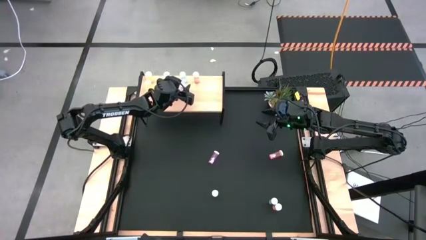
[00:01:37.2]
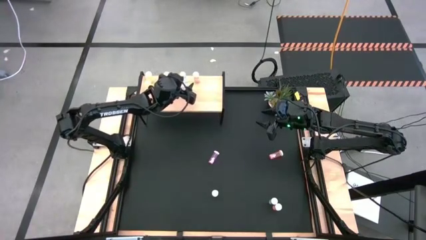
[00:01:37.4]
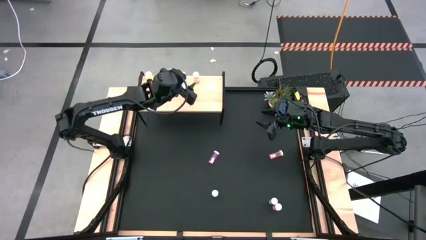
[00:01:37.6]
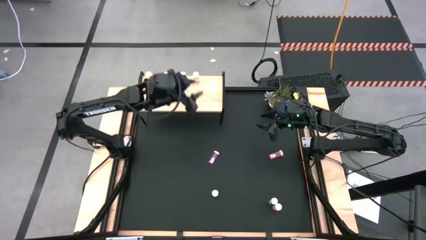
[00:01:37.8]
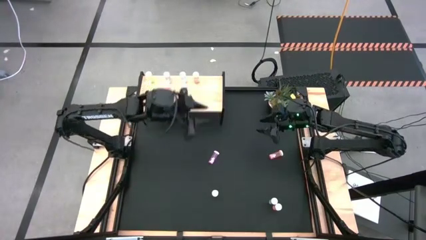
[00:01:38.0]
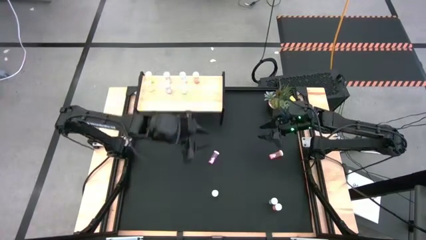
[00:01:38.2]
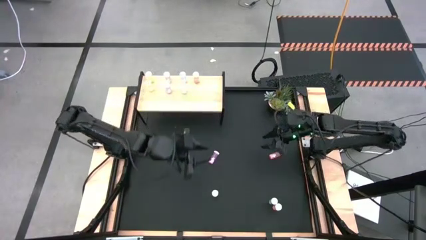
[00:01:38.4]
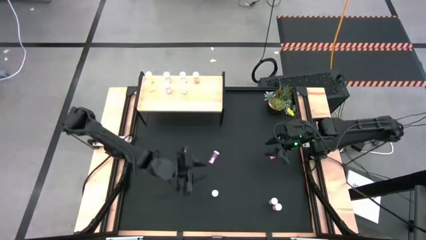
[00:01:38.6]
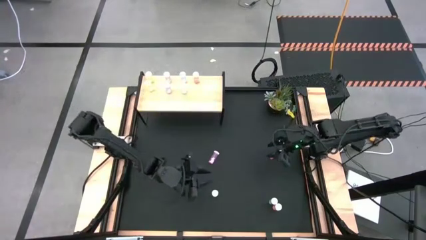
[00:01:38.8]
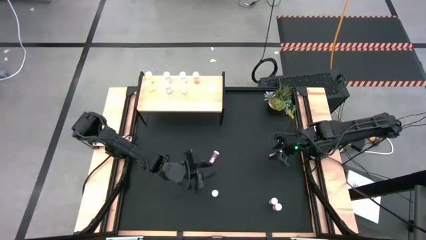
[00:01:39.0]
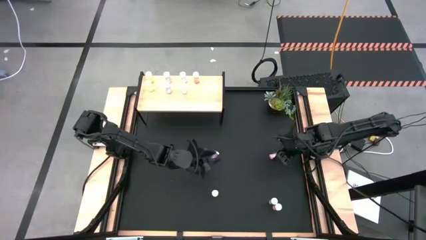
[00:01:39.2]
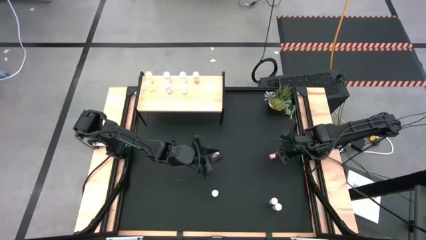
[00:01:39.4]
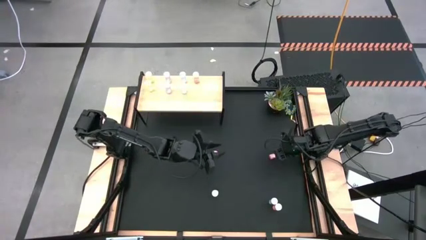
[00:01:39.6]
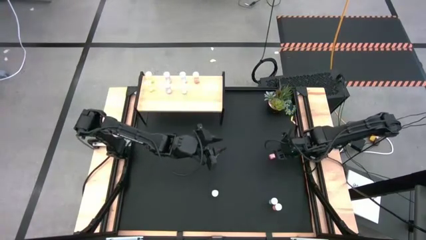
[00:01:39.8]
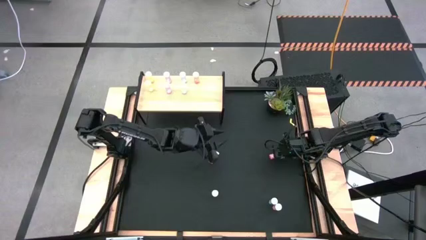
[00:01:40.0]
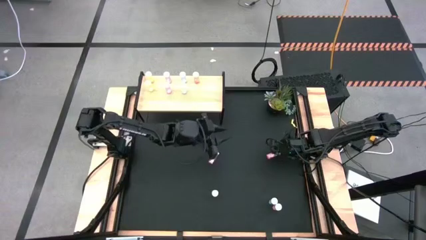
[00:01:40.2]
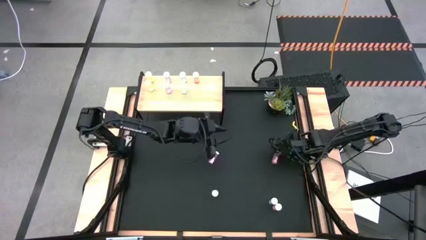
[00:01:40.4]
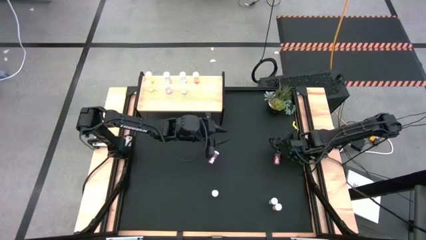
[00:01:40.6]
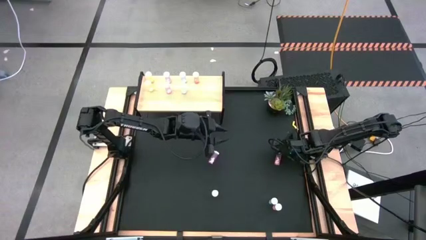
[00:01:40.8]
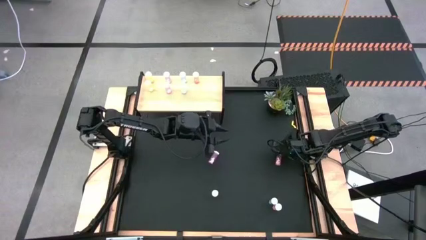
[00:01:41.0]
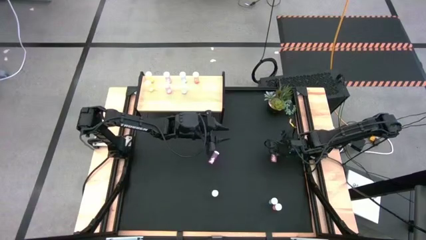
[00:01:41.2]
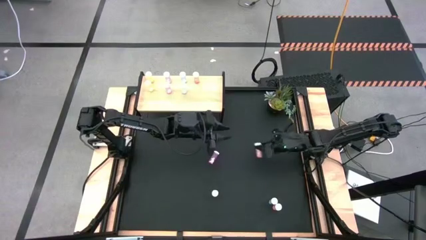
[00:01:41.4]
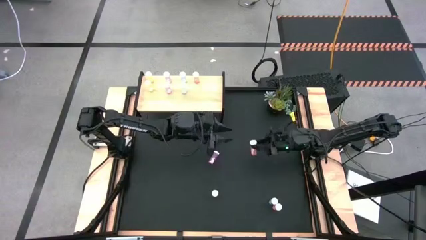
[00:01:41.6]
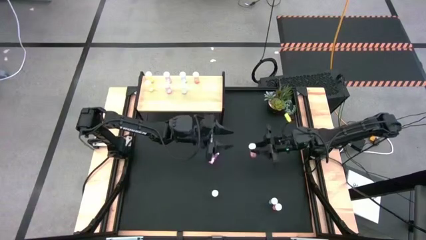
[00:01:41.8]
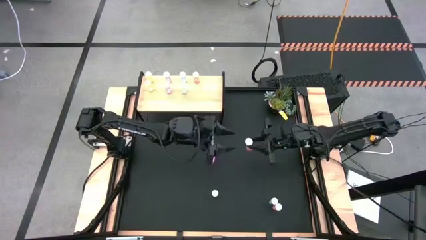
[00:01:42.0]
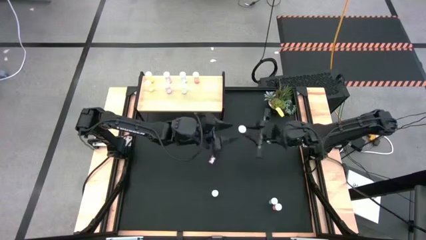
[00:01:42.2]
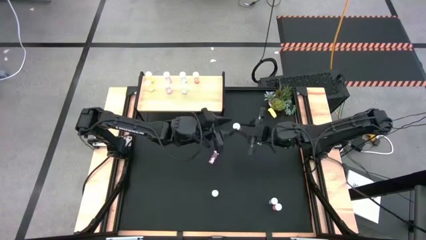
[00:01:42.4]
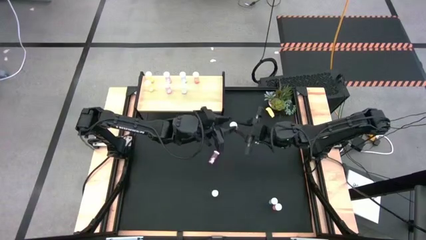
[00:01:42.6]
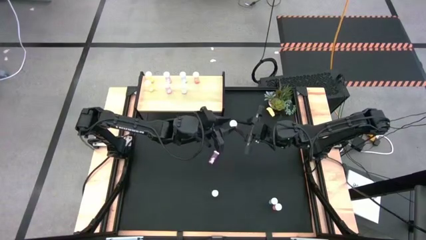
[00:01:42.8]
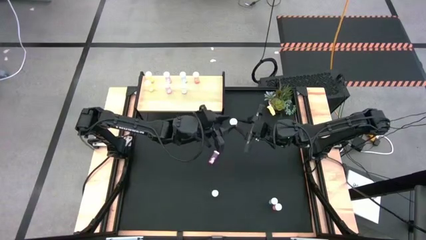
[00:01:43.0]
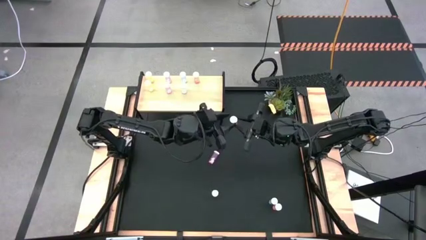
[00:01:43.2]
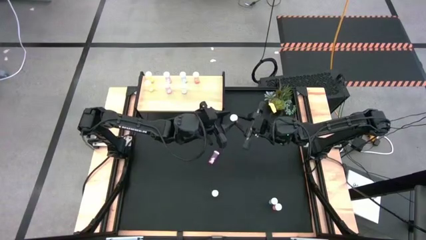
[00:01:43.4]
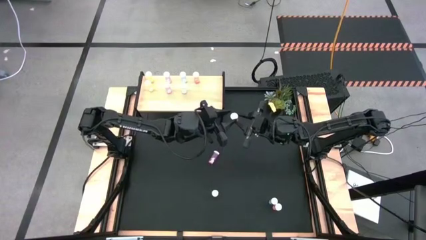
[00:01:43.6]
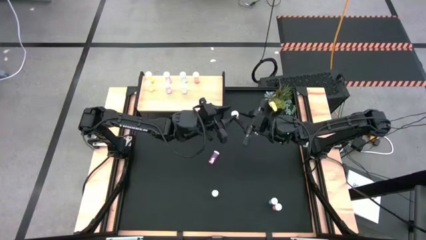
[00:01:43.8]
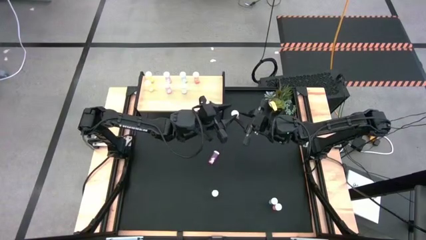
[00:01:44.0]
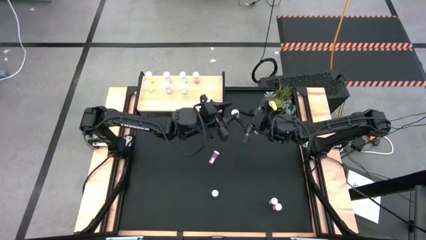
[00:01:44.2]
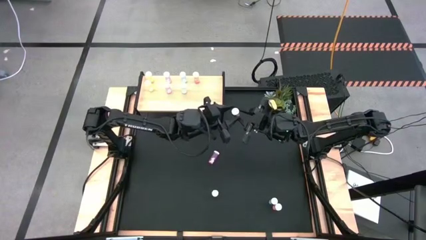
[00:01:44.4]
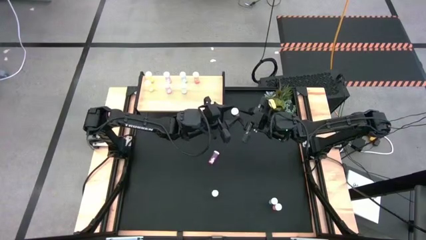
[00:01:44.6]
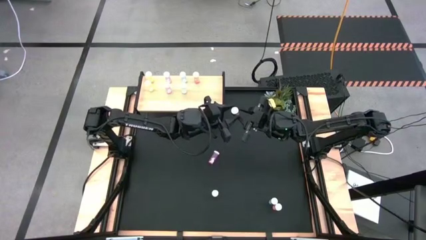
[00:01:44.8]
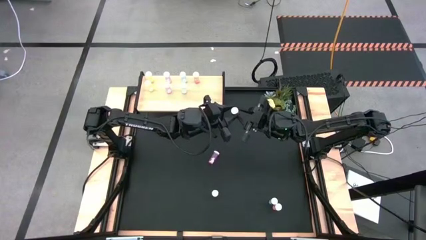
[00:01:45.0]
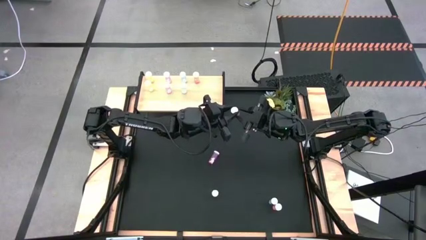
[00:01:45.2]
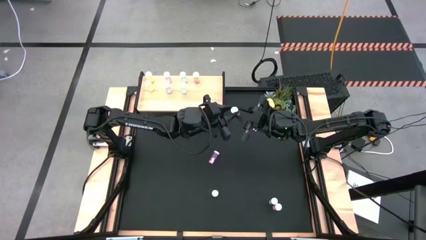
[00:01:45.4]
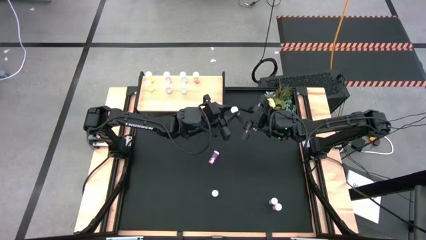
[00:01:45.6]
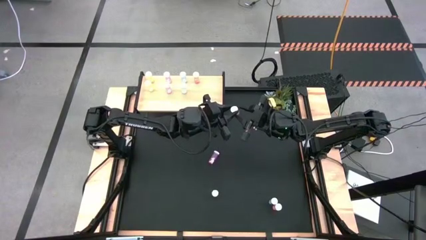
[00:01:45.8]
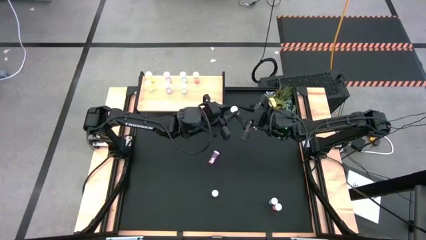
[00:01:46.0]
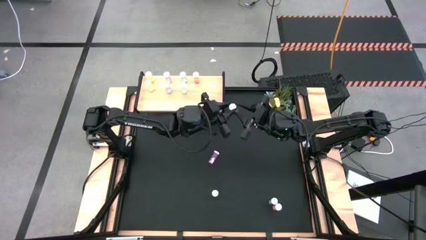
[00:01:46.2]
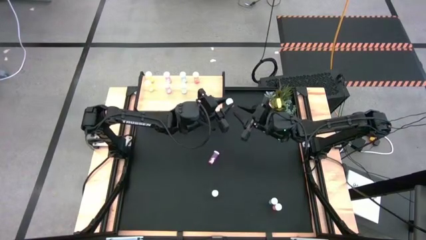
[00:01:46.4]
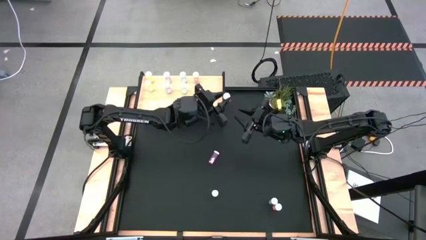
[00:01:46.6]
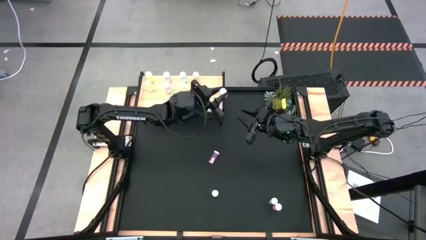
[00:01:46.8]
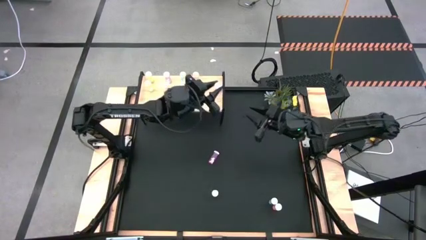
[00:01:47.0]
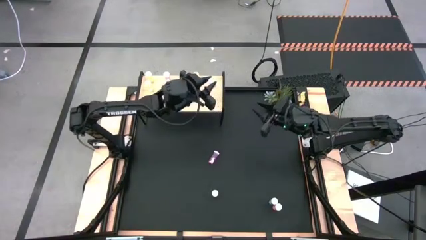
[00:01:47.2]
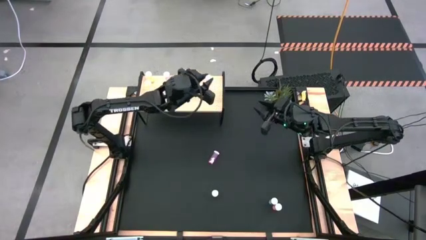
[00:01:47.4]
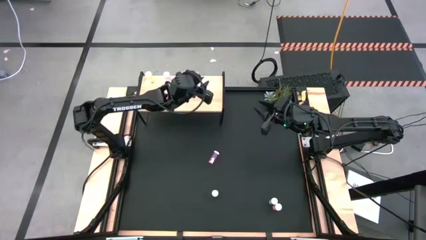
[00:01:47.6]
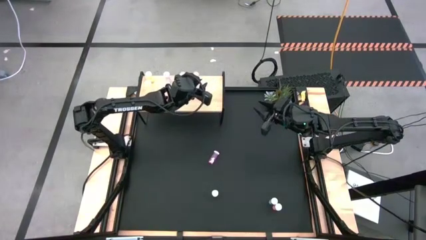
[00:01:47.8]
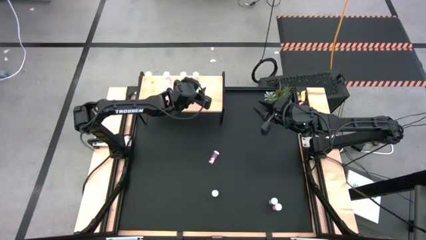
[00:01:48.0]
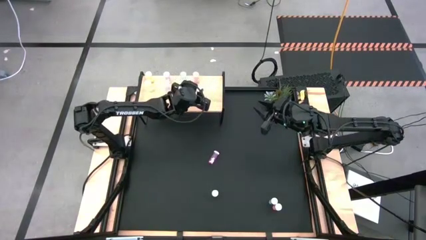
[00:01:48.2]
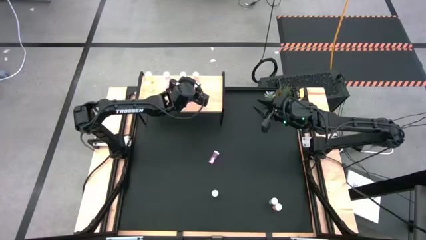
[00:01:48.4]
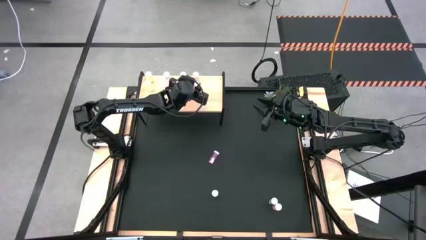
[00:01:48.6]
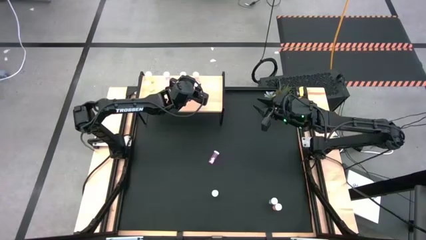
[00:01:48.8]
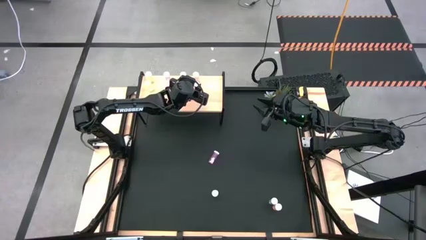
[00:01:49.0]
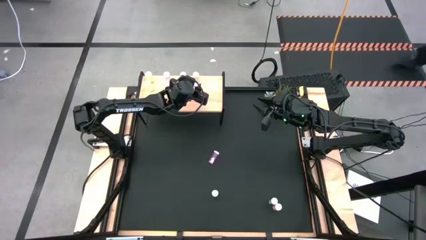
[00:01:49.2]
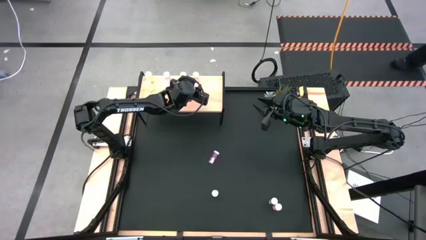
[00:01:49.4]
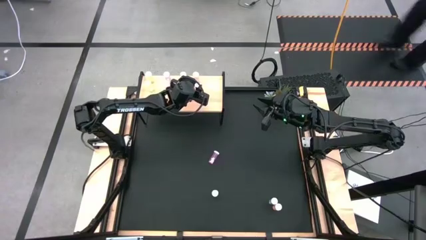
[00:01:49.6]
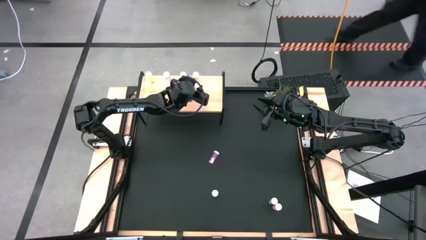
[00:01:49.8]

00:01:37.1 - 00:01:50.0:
Task: Pick and place medicine bottles onto shelf by color
Put the top orange medicine bottle aligned with the other orange medicine bottle on the shelf
